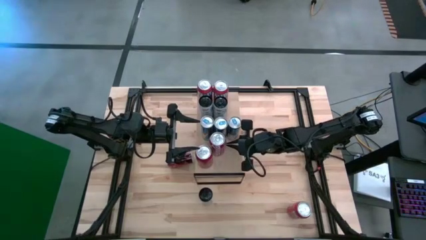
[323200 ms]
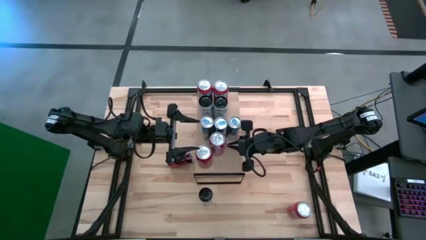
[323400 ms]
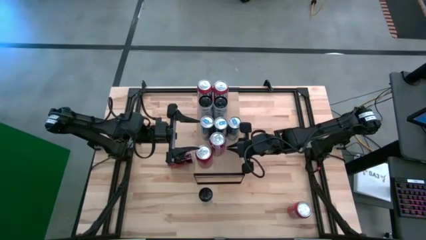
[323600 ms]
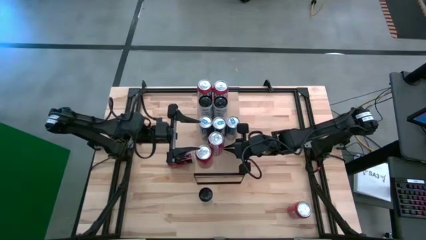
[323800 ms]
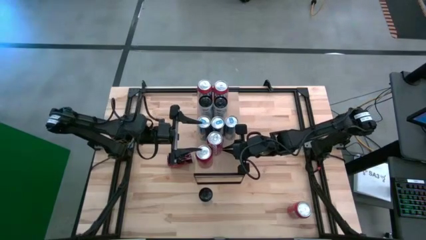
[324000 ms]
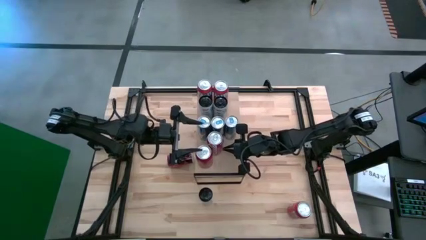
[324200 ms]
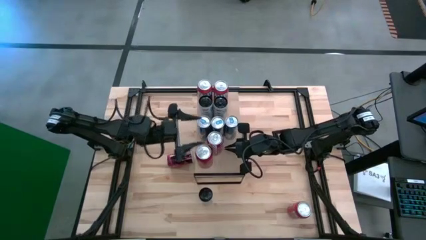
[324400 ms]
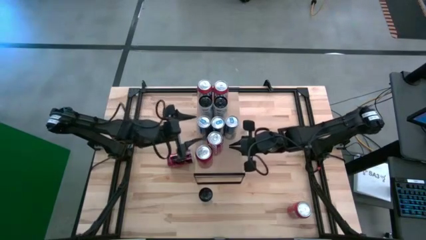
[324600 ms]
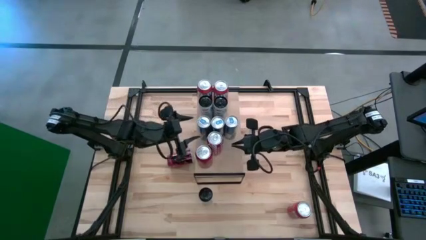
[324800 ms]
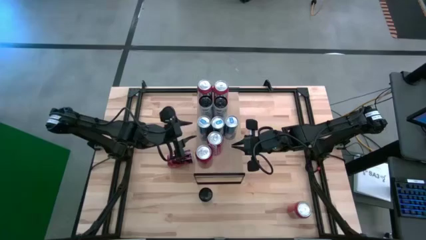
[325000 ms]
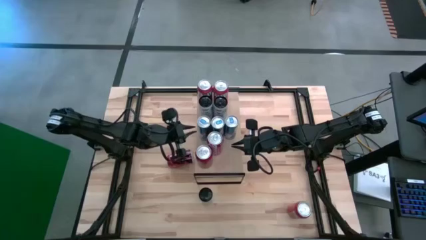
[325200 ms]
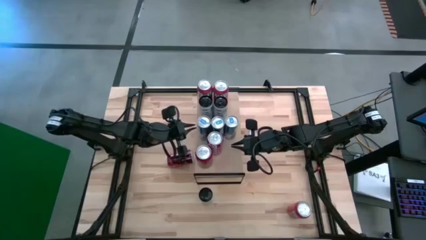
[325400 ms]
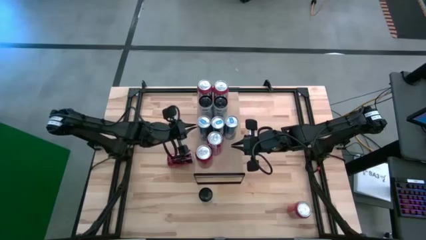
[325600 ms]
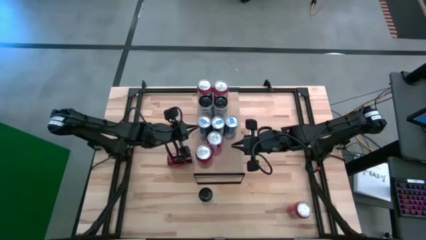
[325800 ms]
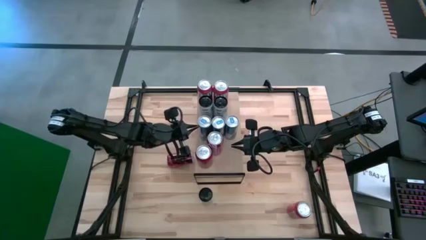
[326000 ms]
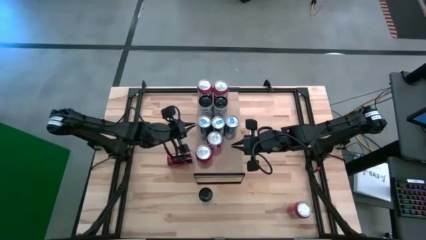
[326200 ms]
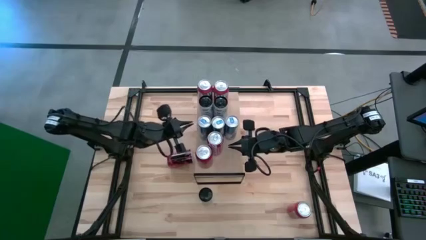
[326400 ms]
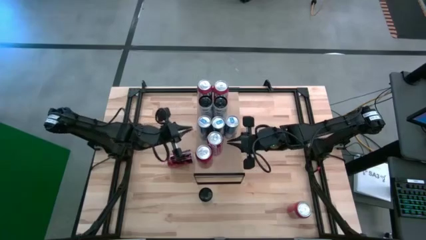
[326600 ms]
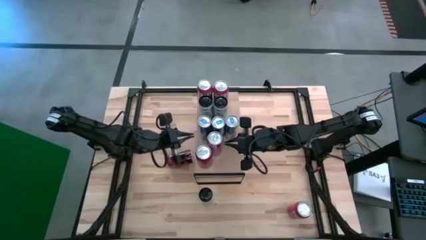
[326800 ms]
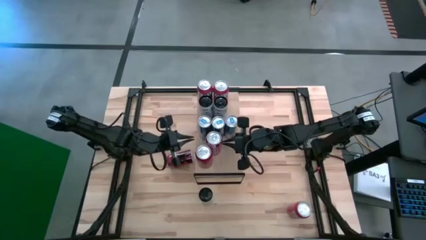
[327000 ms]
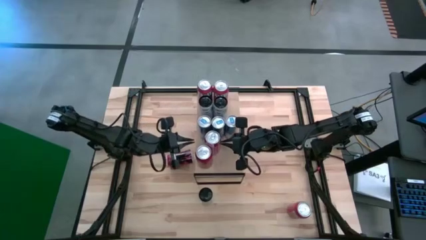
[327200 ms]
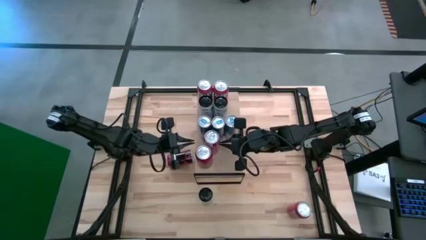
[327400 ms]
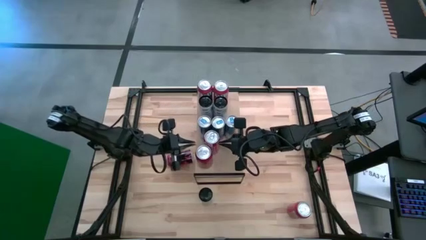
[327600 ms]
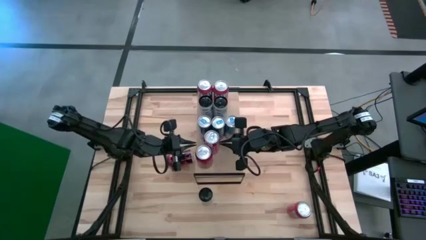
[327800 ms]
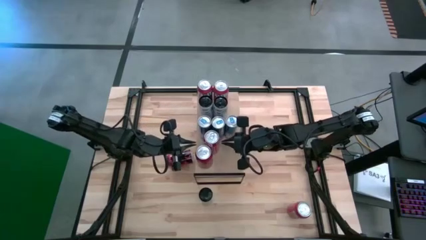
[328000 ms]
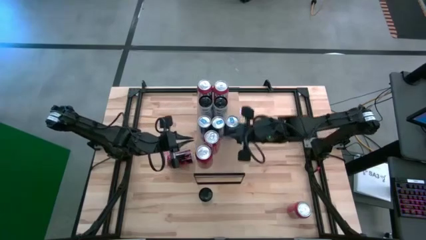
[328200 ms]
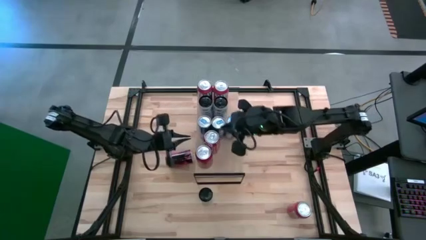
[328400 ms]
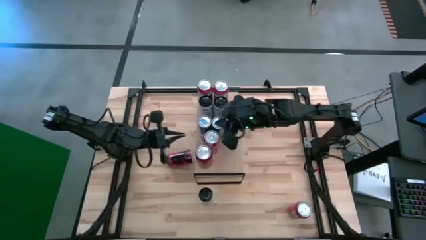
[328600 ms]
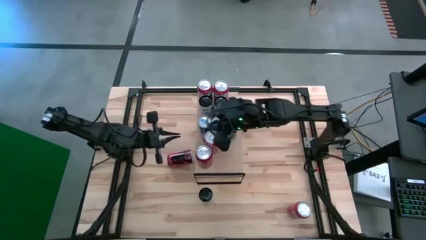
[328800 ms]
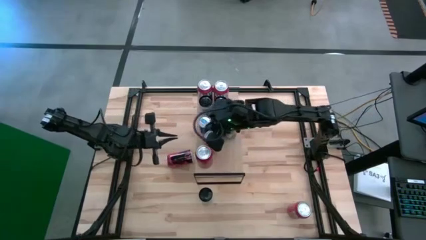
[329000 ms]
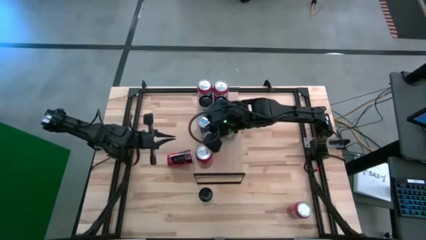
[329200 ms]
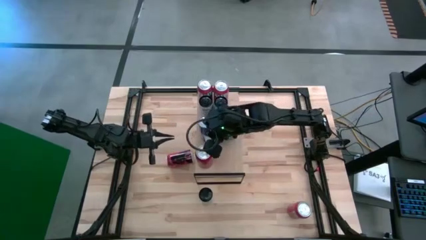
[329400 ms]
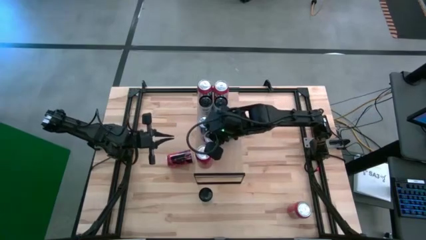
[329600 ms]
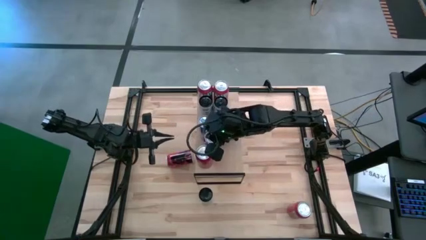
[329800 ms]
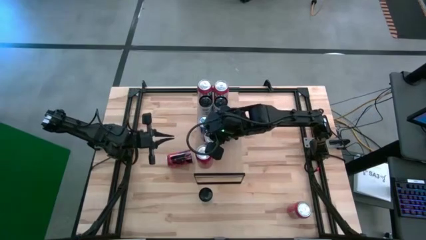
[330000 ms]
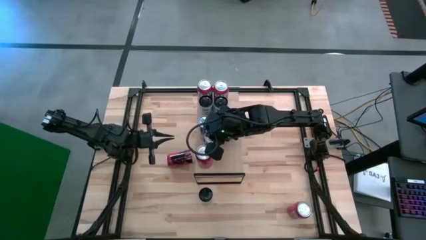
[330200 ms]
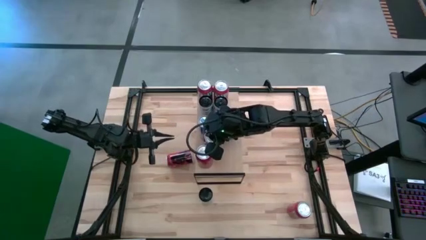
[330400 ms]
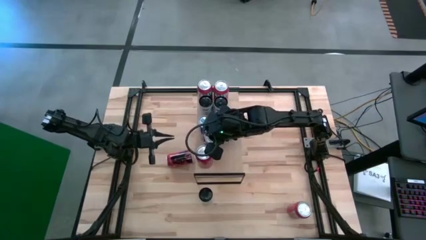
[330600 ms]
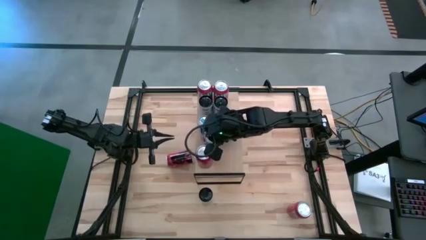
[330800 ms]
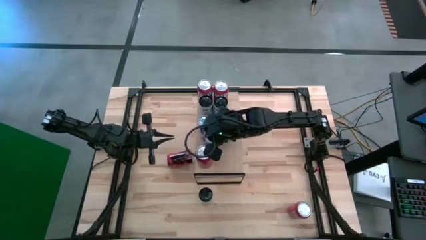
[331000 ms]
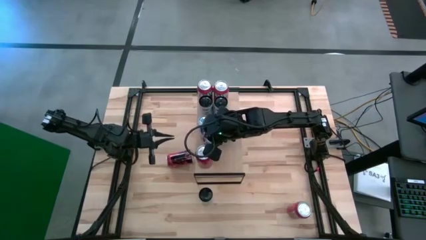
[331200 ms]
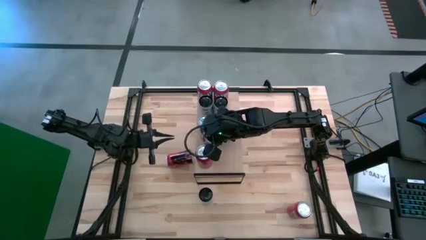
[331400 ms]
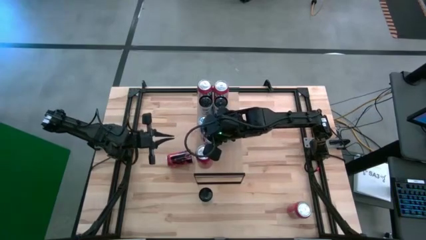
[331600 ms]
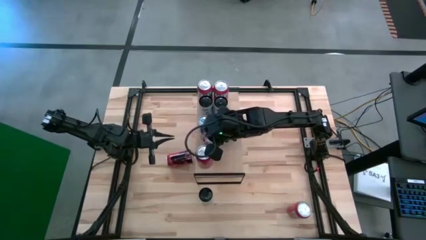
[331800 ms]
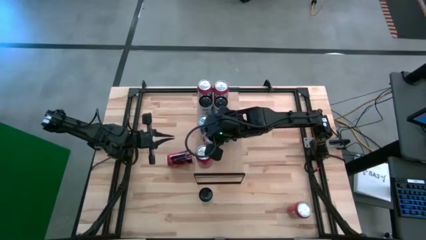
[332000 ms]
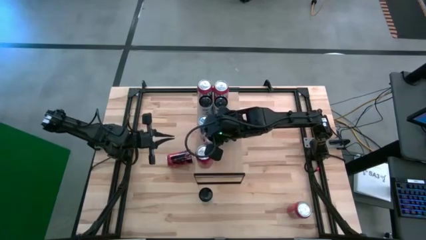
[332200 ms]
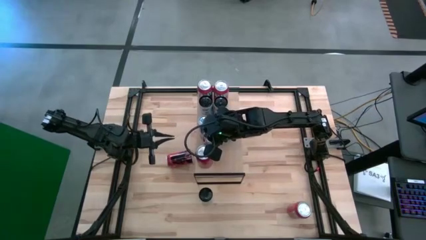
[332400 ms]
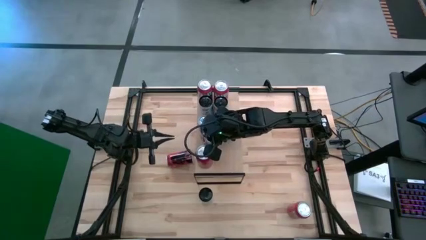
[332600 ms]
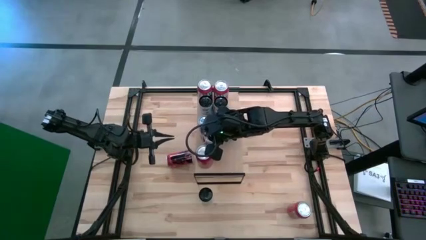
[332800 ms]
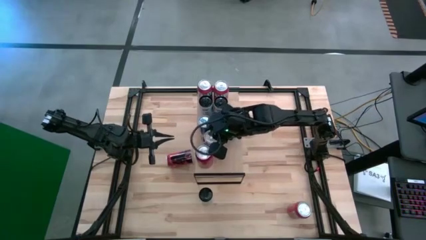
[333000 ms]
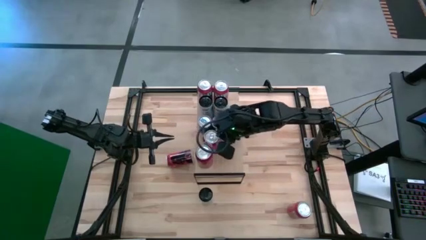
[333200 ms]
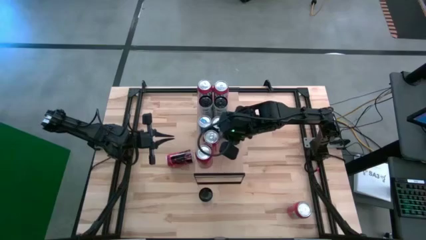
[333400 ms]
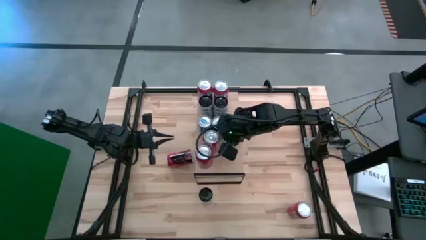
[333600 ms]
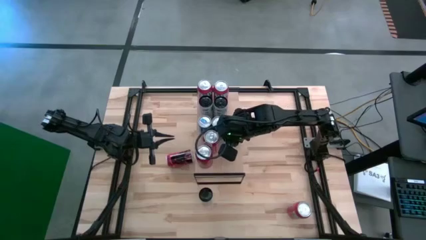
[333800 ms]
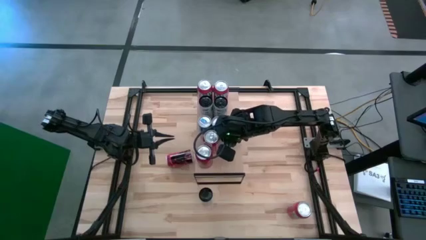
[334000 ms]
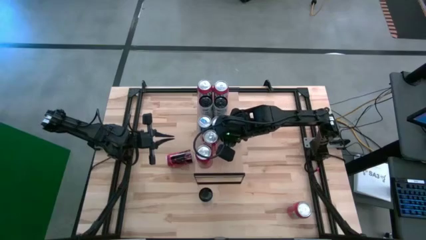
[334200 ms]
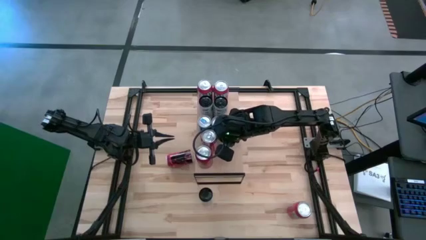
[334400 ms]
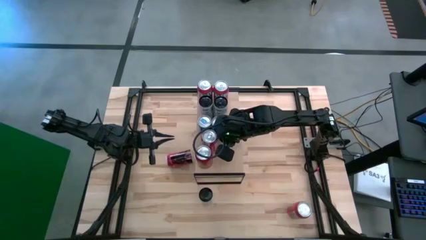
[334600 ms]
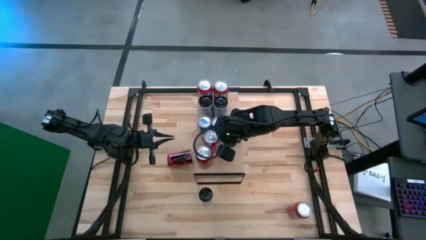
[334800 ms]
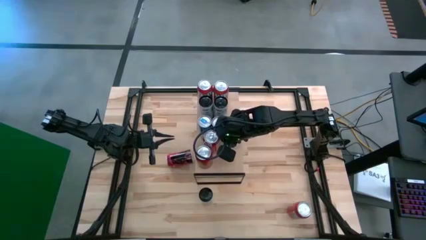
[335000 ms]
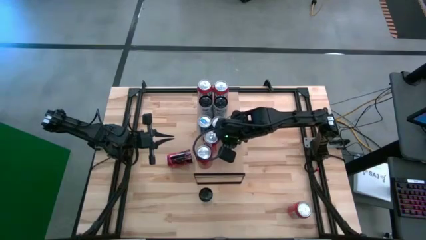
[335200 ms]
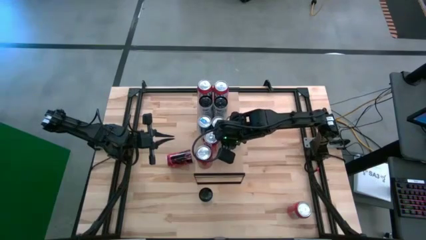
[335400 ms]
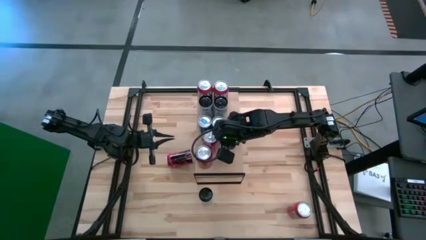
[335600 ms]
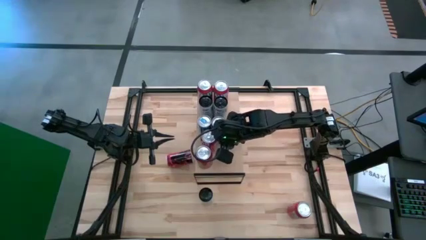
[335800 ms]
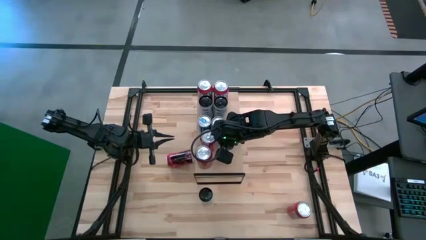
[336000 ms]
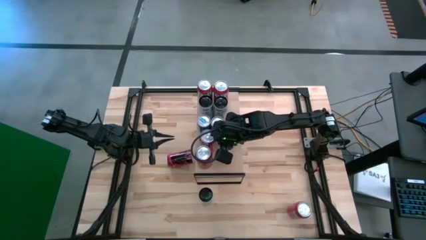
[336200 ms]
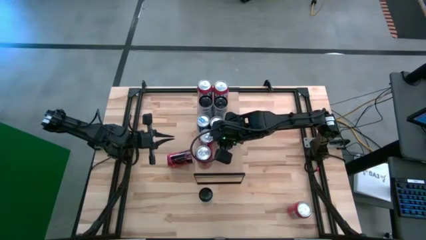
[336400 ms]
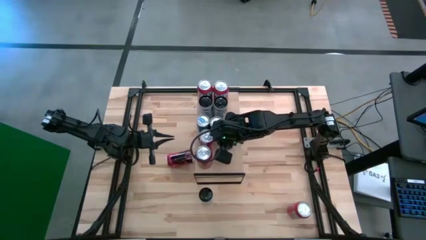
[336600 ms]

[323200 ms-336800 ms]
Task: Place canned beverage on shelf
Put the red white soda can on the shelf

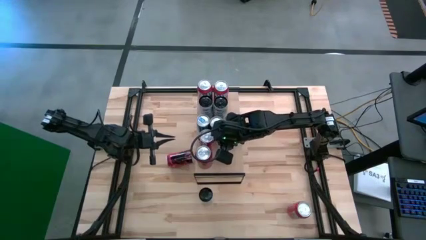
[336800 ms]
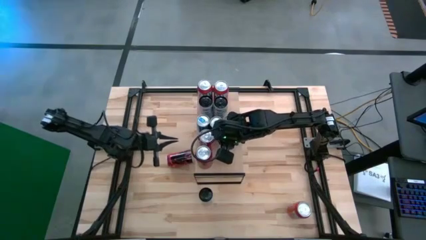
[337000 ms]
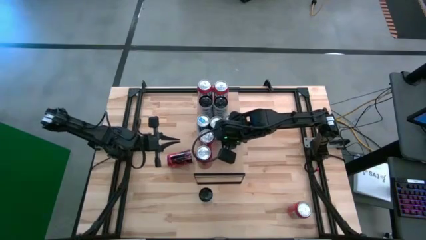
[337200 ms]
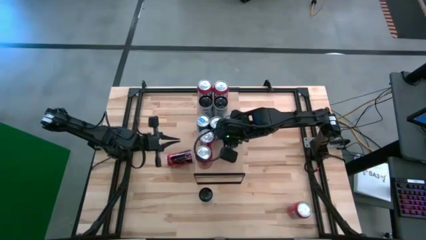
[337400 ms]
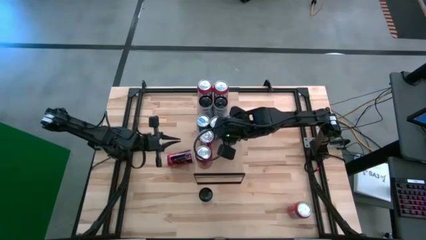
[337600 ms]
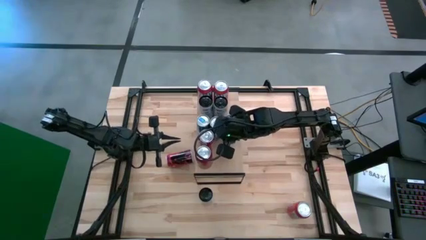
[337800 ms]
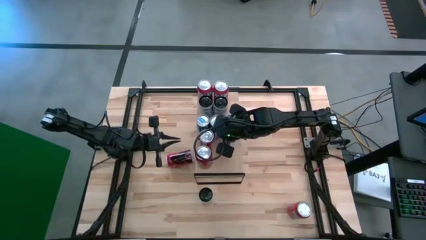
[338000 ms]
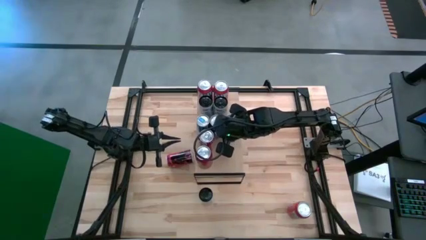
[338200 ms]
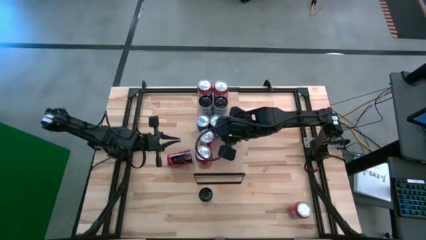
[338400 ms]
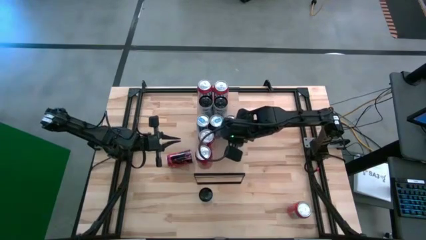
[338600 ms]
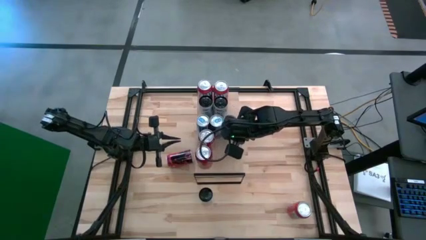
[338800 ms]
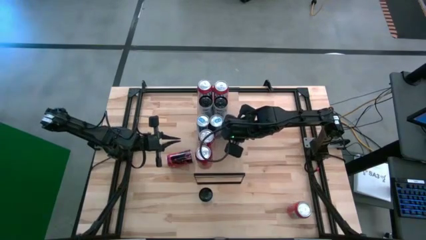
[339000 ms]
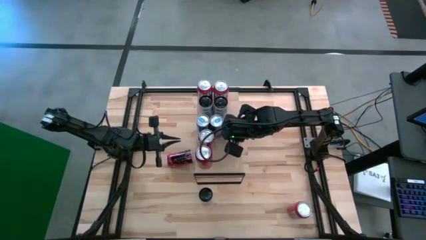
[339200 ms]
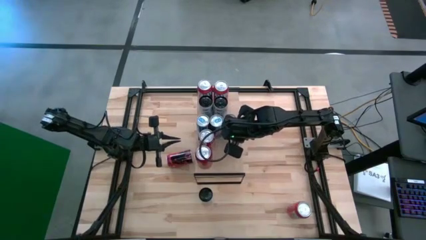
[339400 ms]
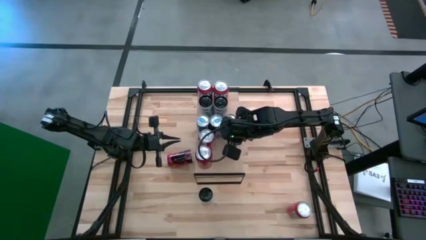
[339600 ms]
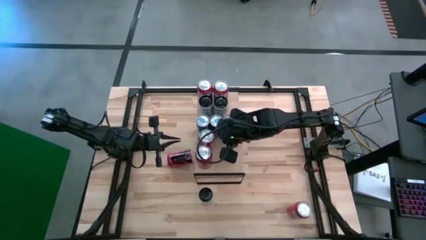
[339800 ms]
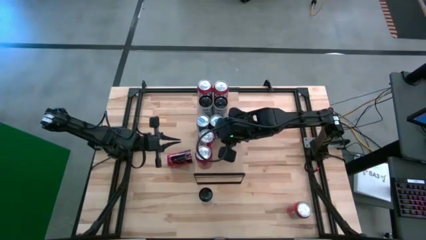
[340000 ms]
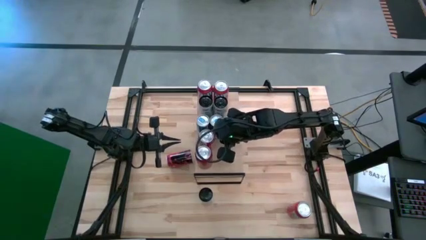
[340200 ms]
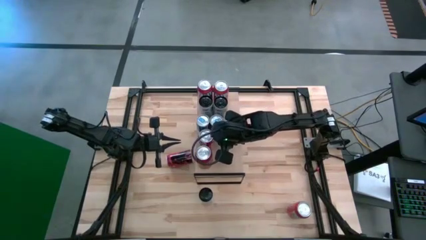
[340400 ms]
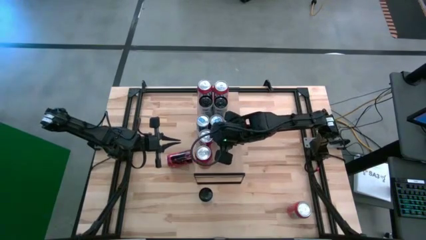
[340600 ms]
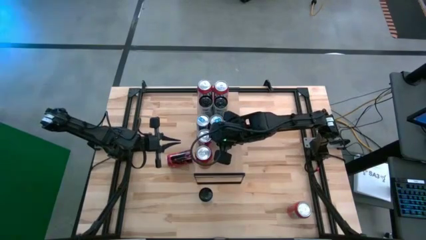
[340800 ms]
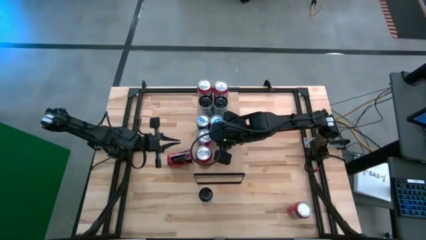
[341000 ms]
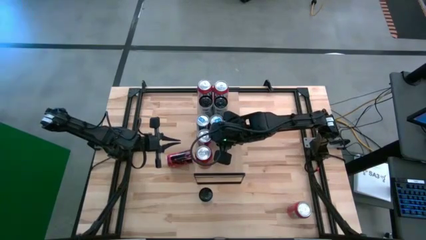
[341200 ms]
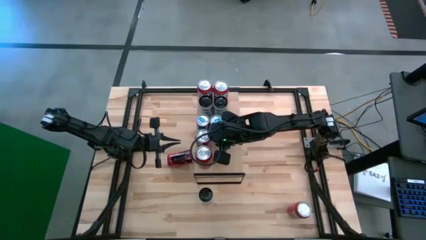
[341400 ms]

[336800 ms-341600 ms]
Adjust the soda cans
